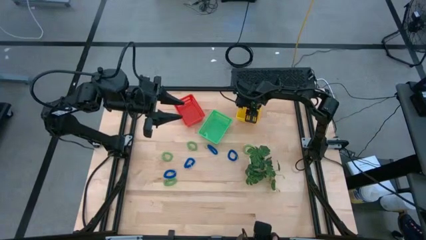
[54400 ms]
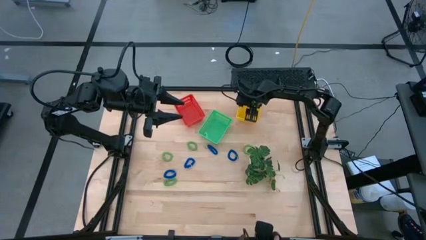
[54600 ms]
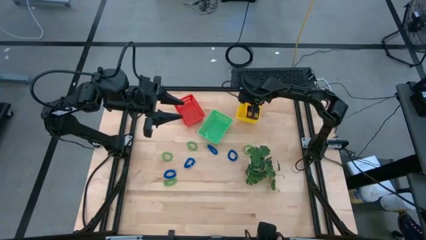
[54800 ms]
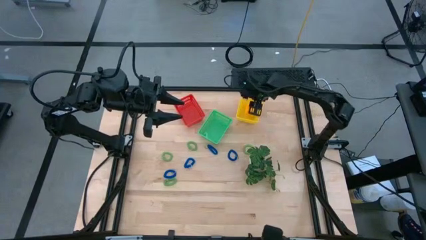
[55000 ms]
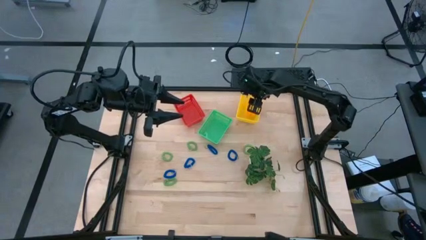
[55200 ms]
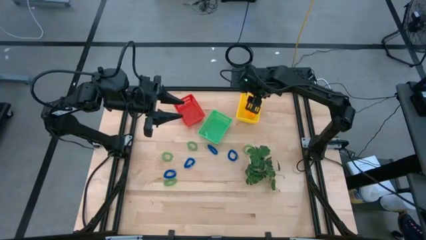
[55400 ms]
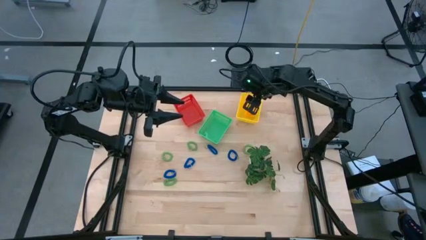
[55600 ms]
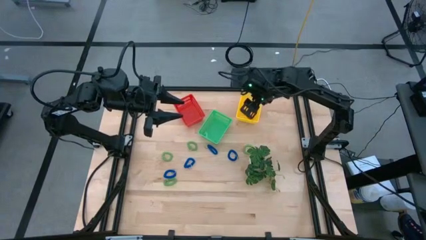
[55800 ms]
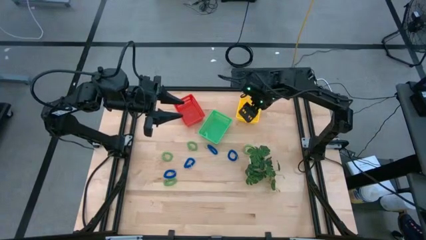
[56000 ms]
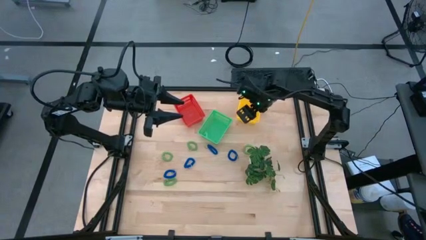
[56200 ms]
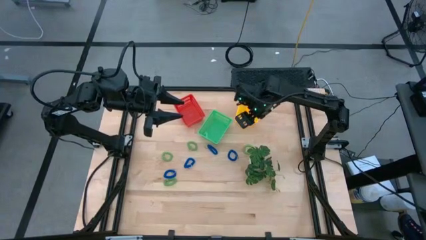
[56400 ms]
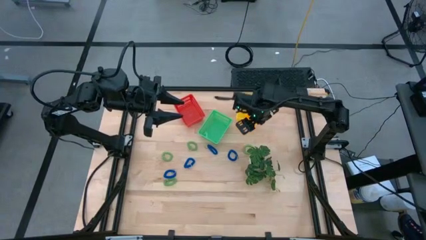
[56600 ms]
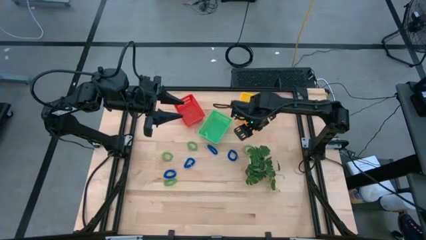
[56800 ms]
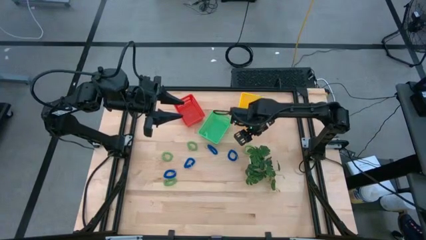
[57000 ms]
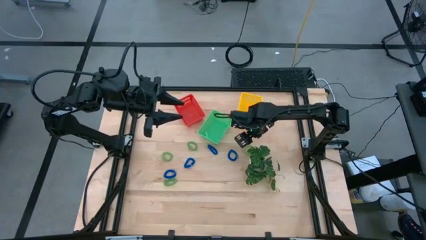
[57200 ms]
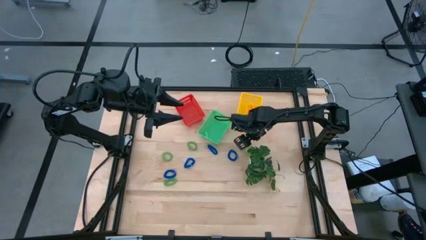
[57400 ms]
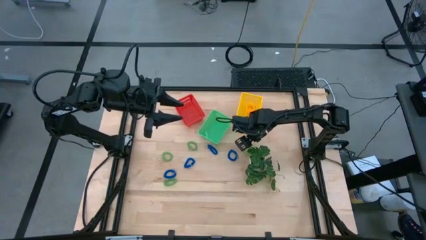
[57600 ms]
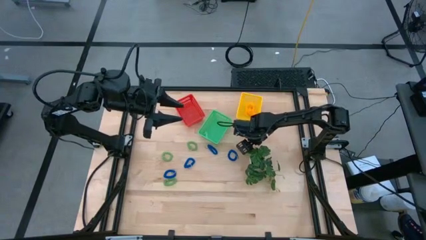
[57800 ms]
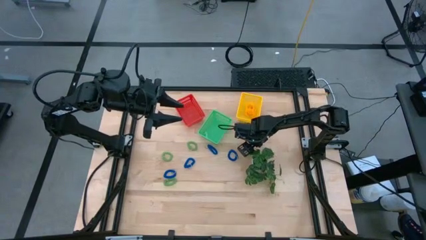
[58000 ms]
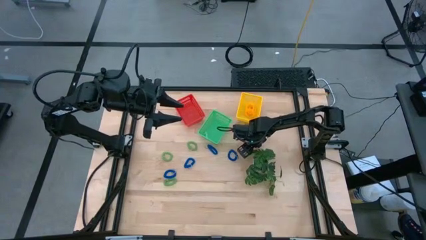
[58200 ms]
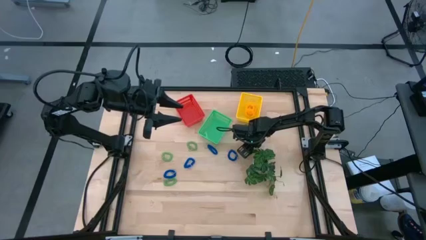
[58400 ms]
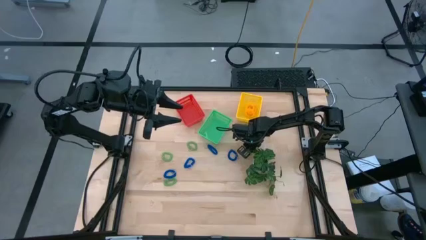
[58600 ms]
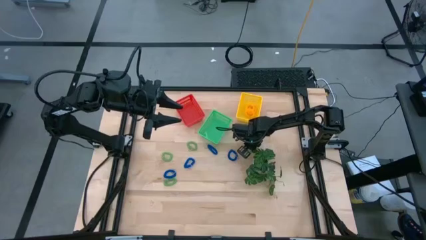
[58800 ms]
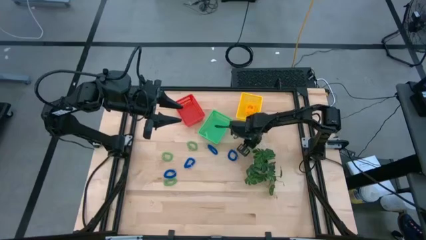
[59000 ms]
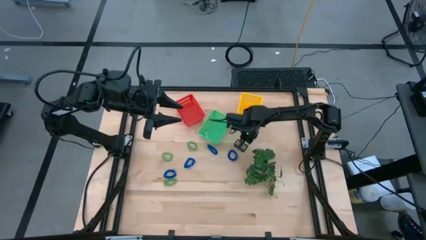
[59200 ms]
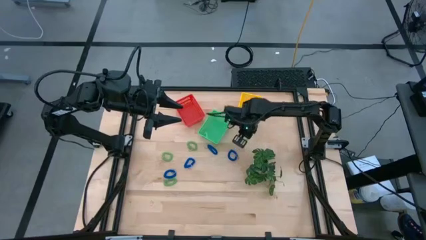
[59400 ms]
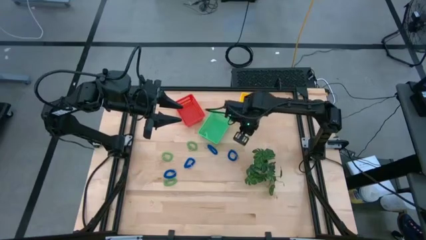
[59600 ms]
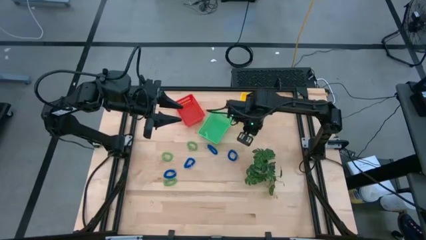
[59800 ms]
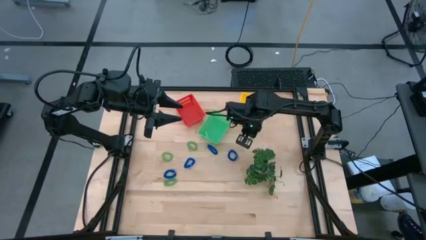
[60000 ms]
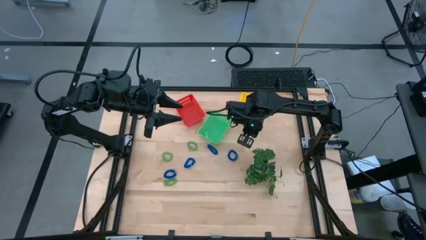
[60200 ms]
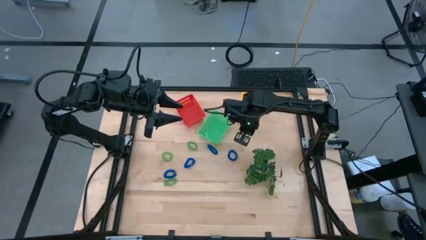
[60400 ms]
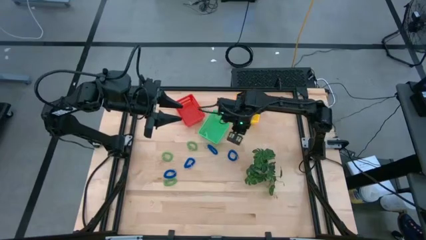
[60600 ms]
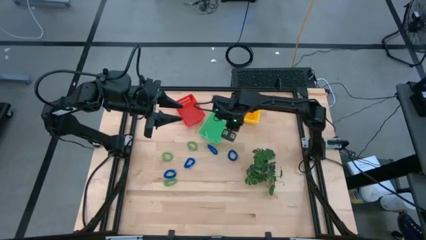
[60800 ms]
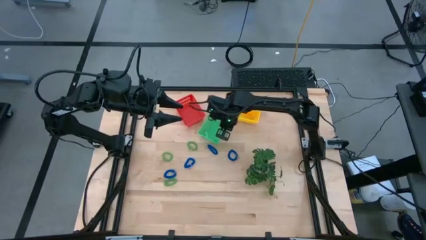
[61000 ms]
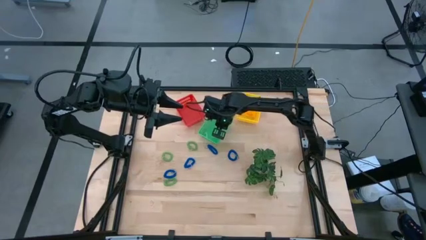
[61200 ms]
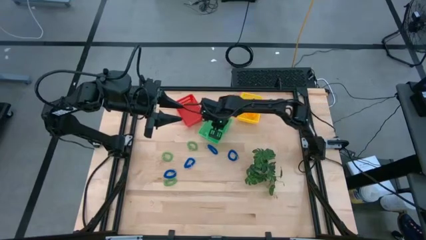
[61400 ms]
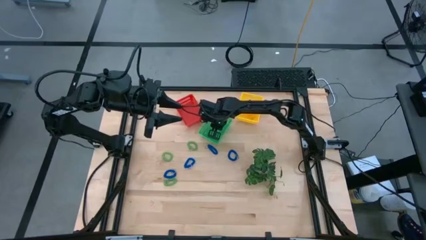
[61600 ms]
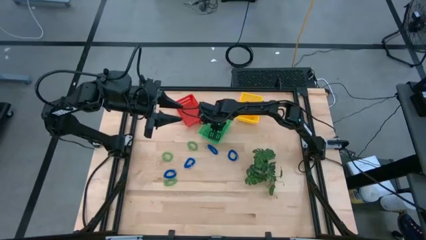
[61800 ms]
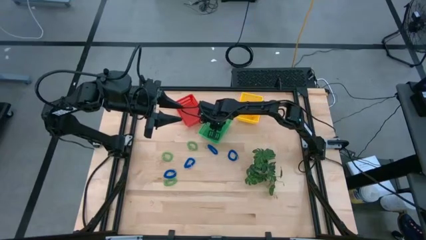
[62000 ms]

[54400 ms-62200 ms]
Task: Sort spring keychains
Put the green spring keychain into the green bin

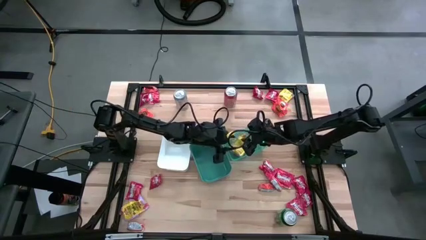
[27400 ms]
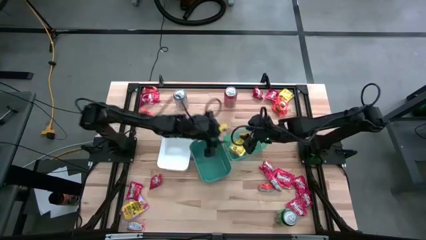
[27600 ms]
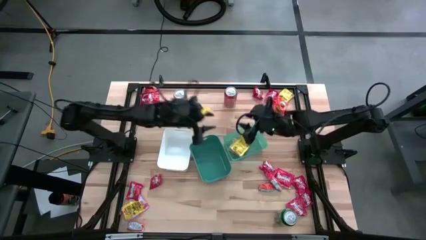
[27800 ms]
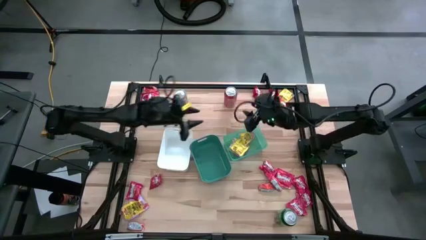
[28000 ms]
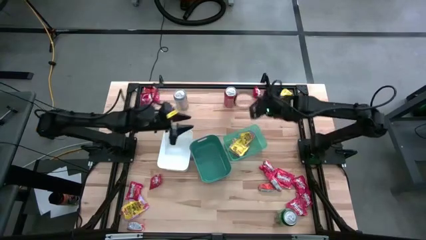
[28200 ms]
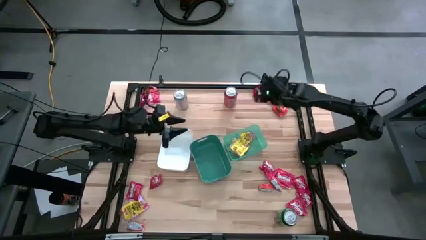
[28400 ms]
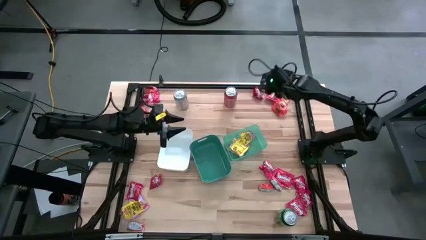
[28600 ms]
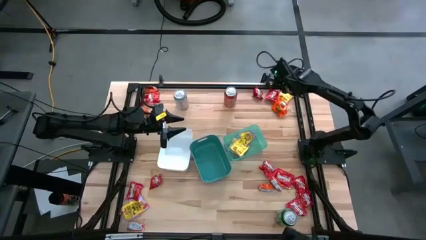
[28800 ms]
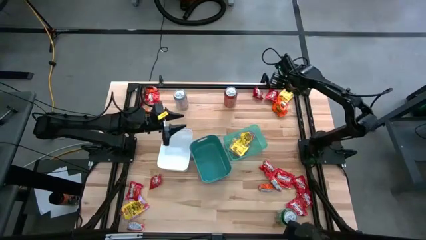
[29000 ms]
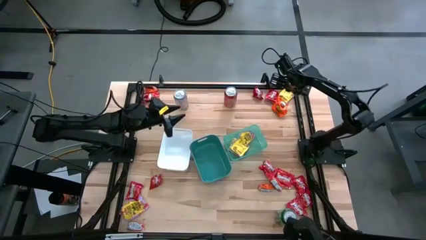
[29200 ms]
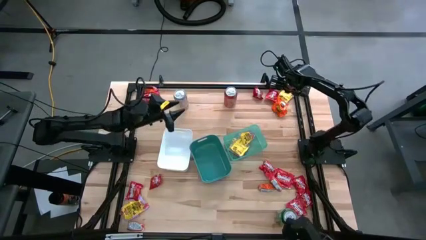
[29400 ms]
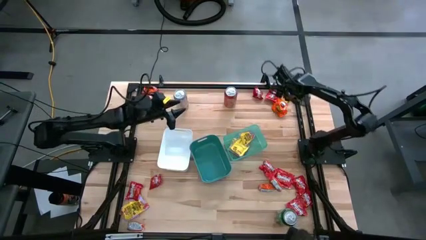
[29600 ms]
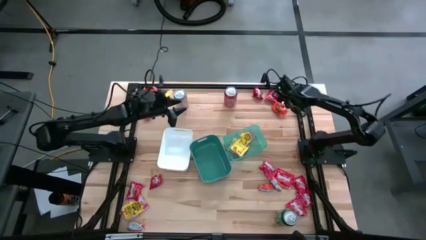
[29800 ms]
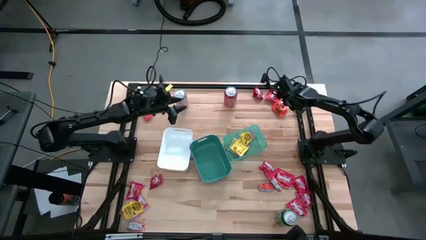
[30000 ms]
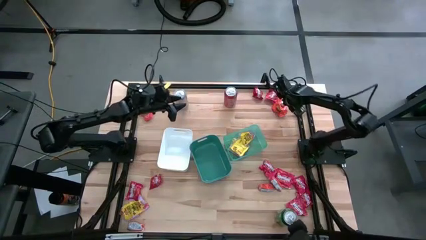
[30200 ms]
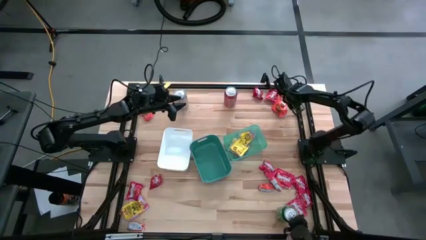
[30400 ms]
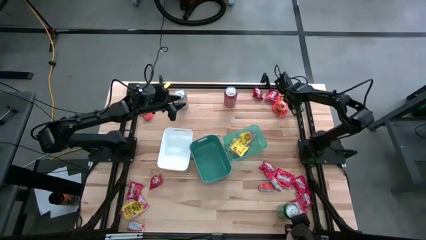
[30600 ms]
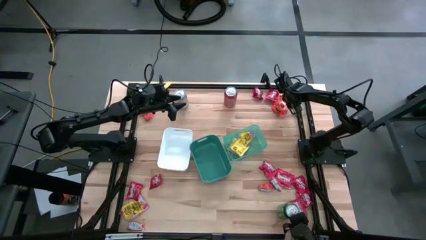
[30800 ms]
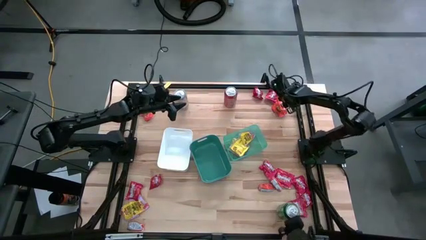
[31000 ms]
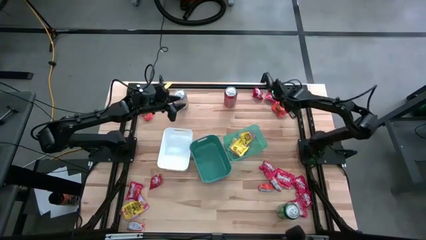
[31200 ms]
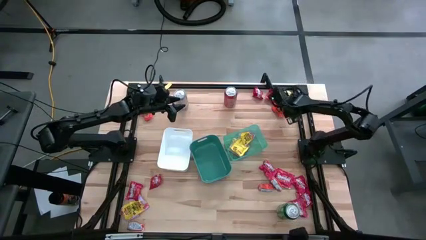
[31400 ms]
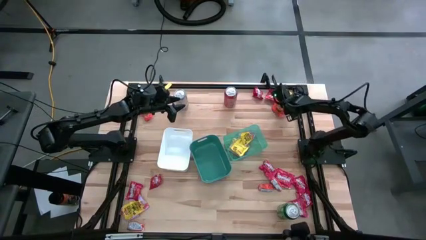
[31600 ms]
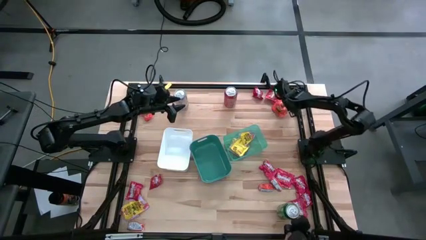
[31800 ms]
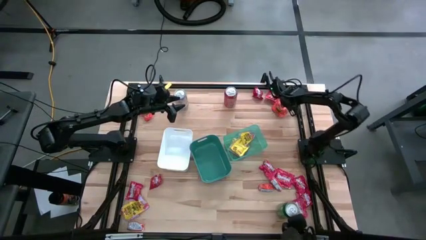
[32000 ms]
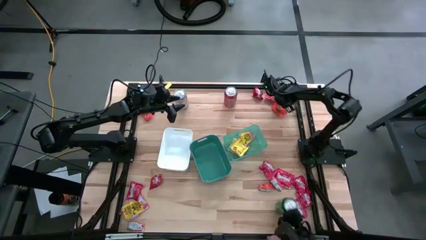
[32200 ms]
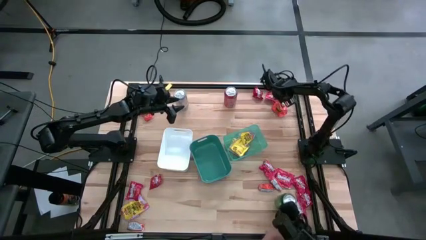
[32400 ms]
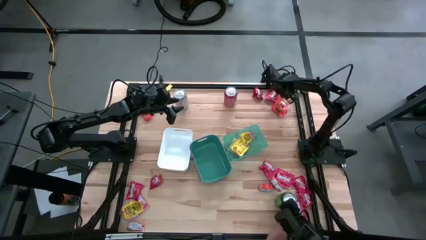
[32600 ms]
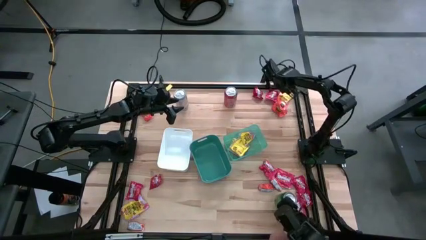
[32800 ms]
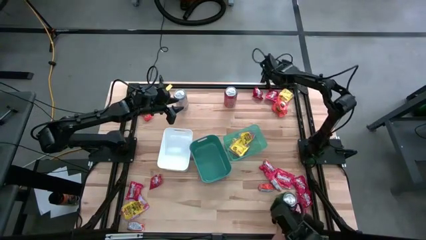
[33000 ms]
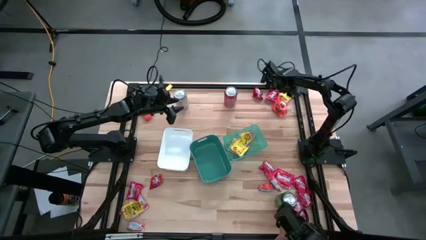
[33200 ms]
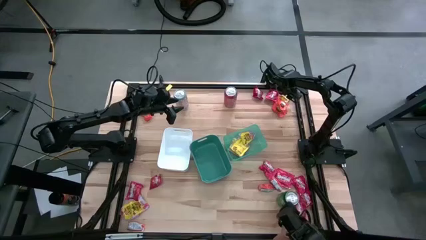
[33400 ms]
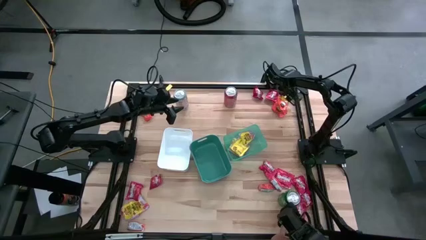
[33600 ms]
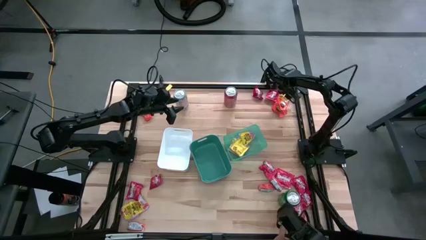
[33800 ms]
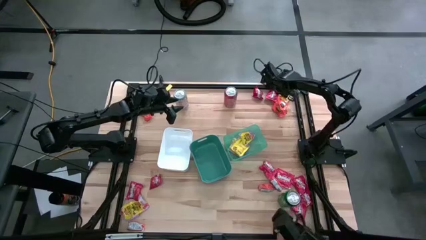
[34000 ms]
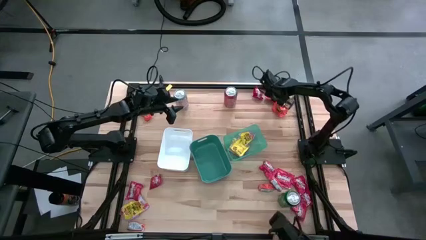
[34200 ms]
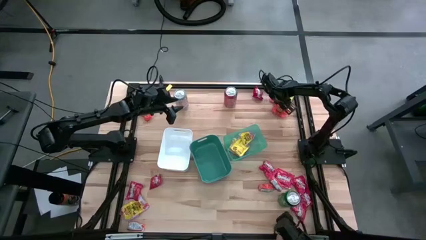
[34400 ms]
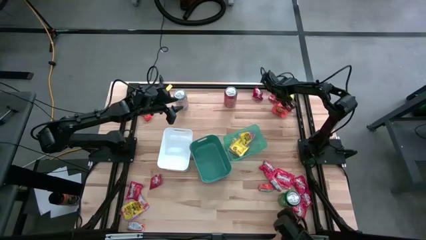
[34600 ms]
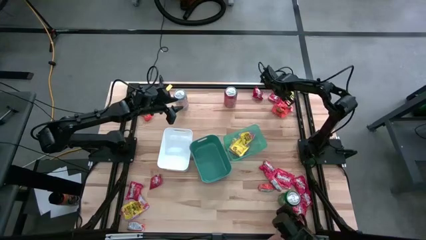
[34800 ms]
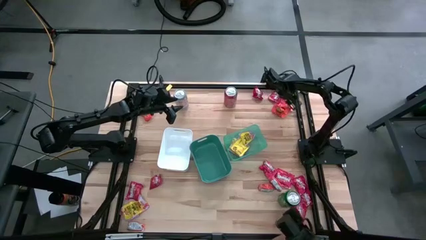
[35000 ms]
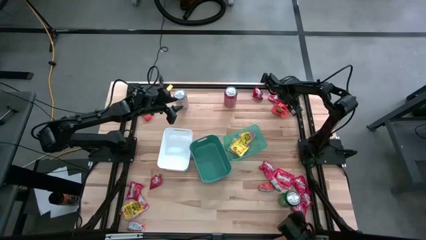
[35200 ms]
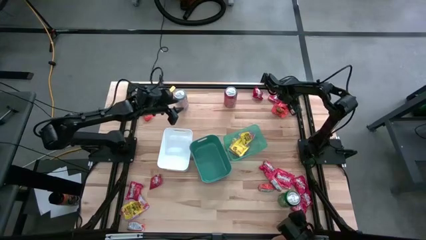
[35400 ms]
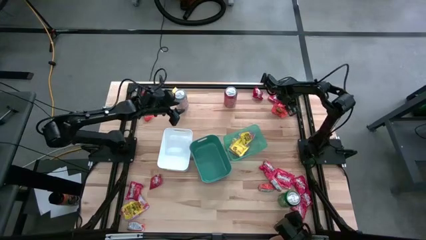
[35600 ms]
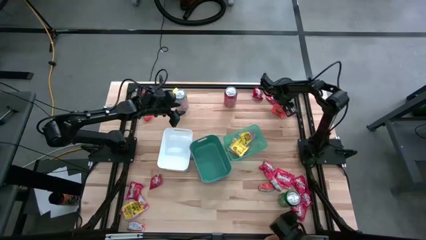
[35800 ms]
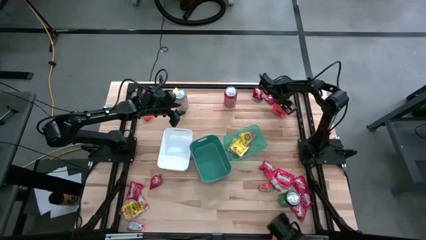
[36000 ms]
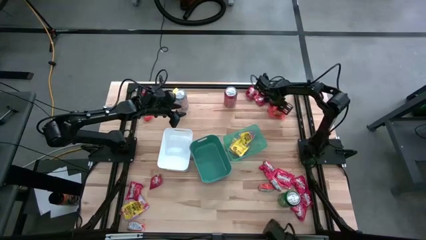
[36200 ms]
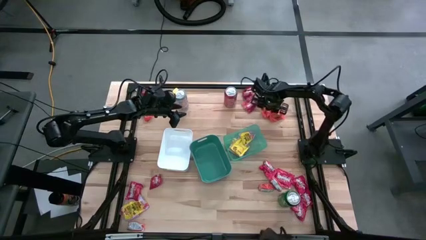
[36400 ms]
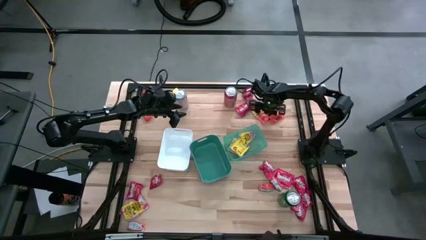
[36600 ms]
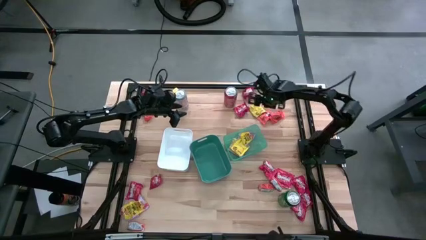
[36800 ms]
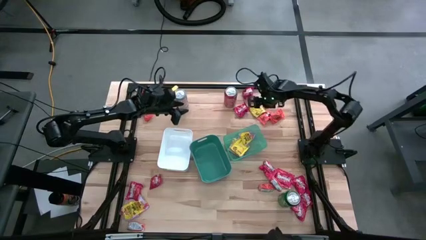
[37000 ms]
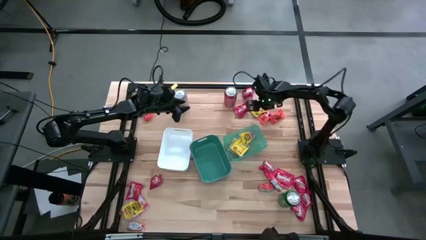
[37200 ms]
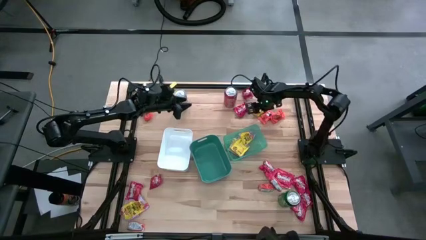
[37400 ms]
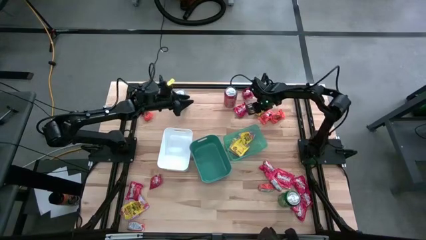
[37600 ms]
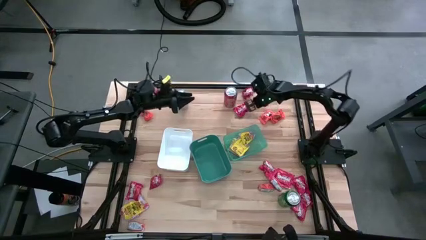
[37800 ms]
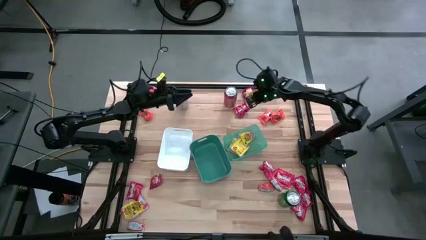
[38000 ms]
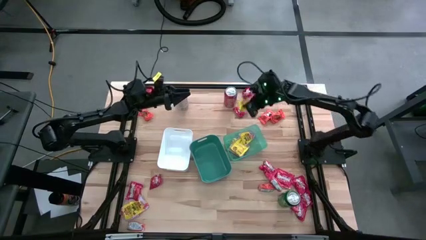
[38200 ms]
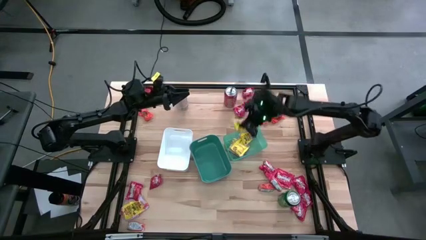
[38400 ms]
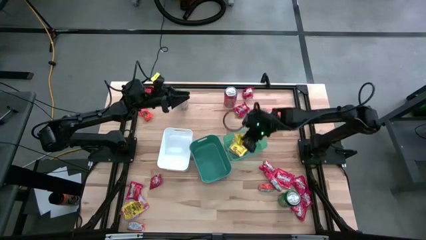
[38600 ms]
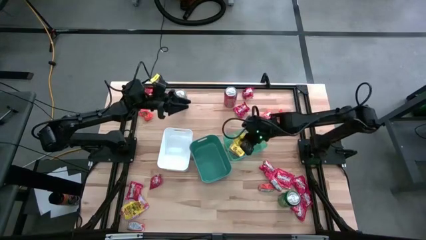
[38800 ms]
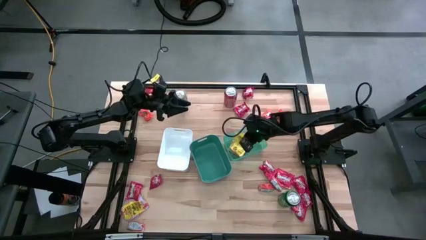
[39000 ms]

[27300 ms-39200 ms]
Task: Sort candy
Put the yellow candy into the green transparent bin
